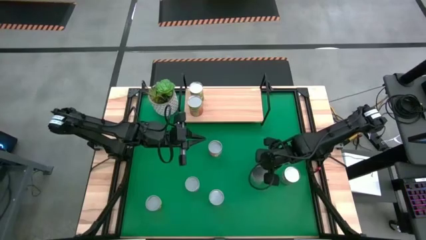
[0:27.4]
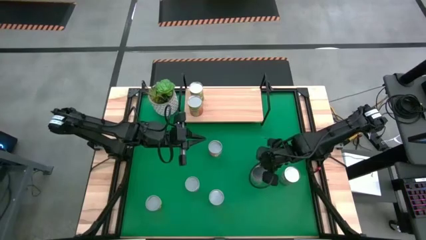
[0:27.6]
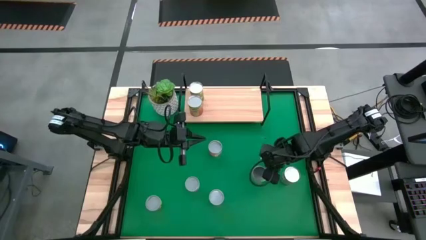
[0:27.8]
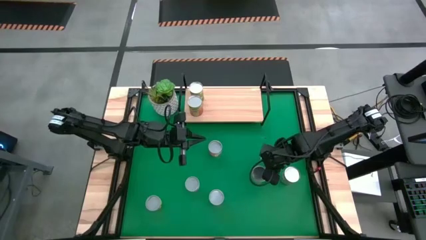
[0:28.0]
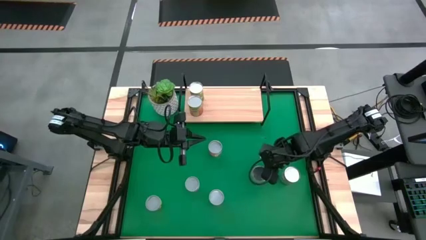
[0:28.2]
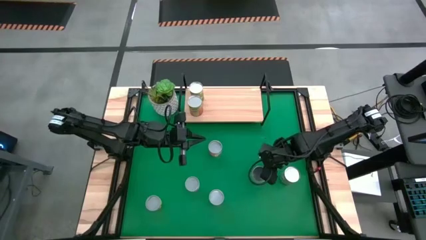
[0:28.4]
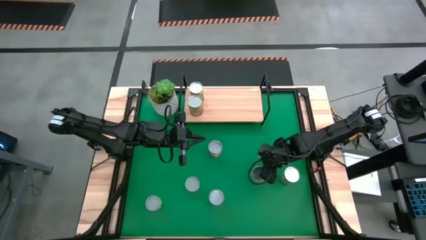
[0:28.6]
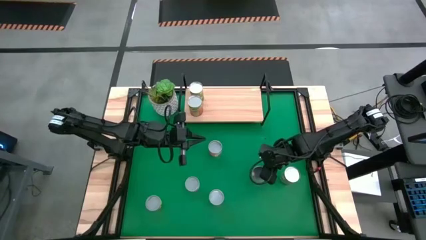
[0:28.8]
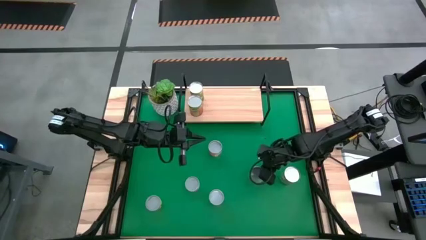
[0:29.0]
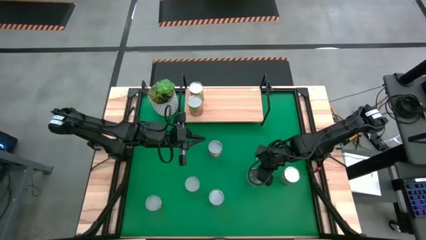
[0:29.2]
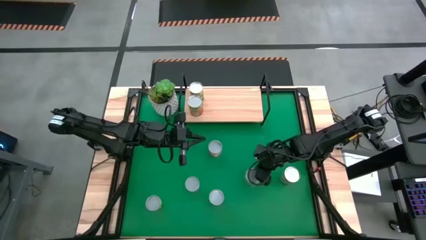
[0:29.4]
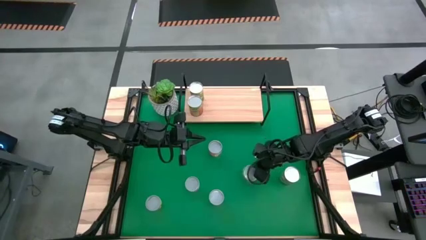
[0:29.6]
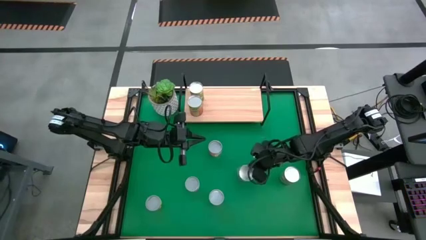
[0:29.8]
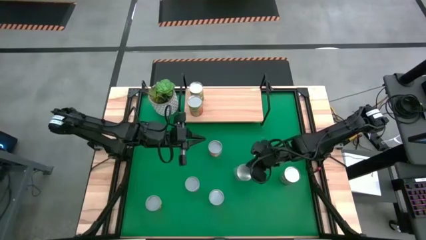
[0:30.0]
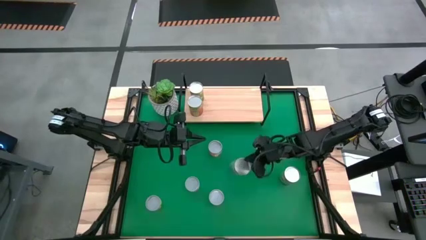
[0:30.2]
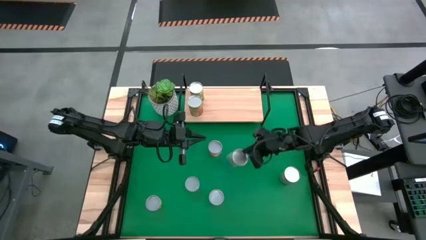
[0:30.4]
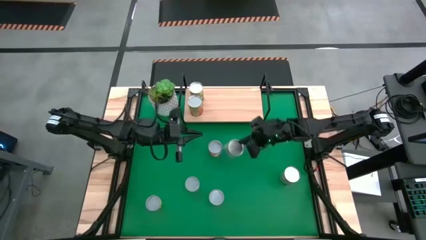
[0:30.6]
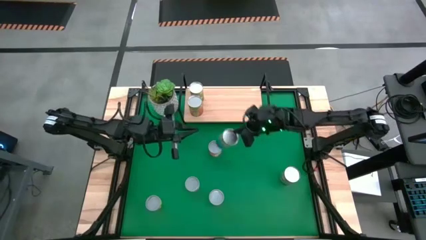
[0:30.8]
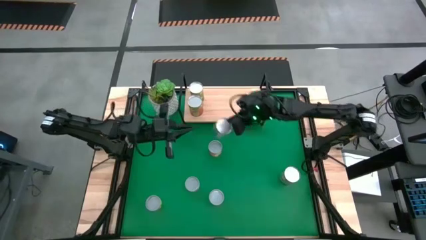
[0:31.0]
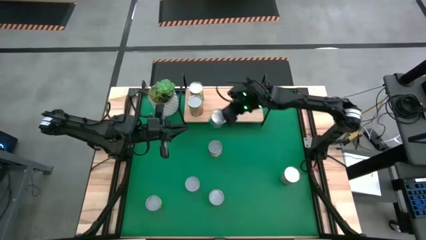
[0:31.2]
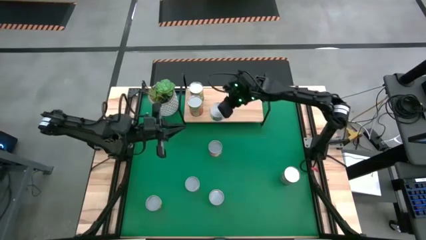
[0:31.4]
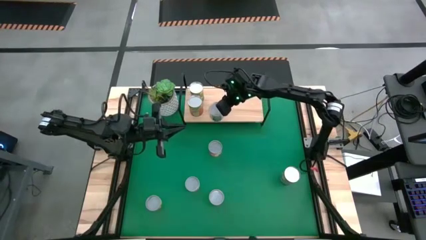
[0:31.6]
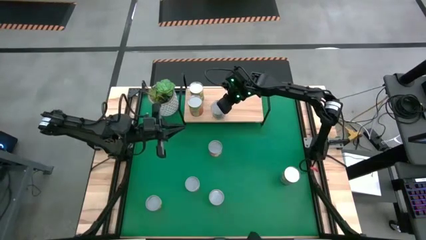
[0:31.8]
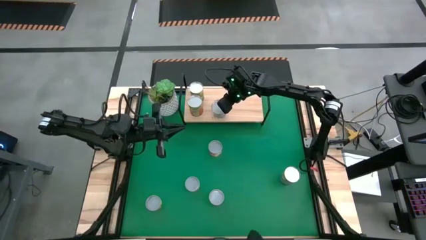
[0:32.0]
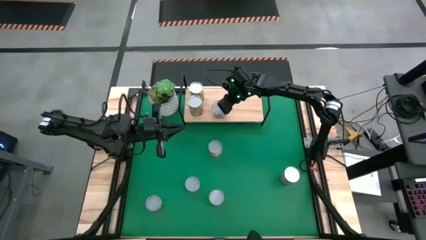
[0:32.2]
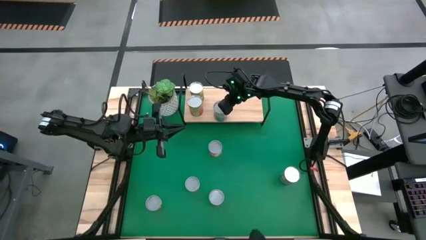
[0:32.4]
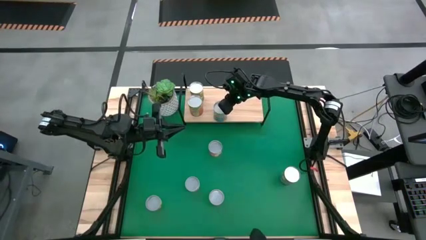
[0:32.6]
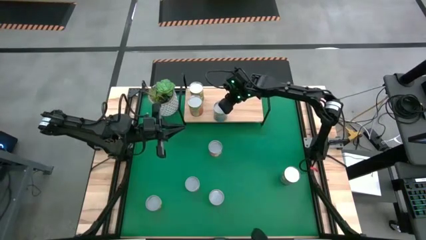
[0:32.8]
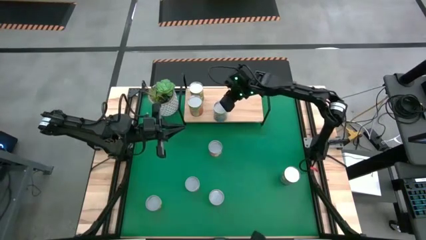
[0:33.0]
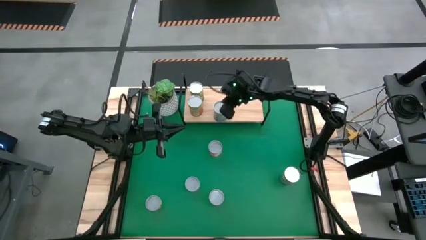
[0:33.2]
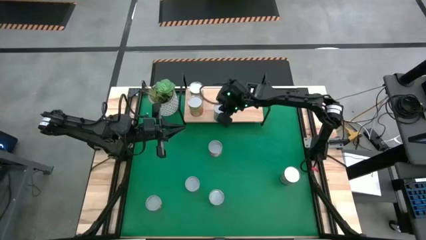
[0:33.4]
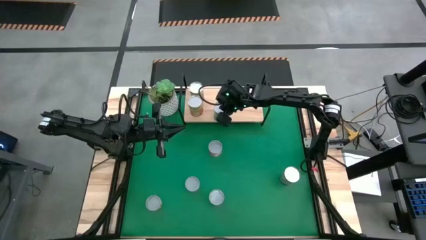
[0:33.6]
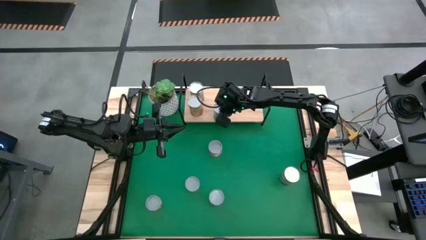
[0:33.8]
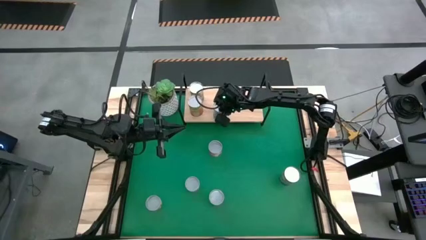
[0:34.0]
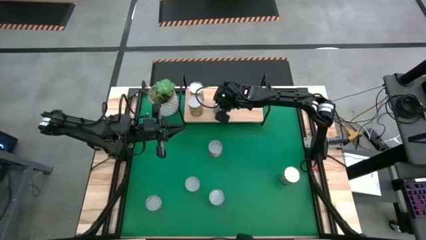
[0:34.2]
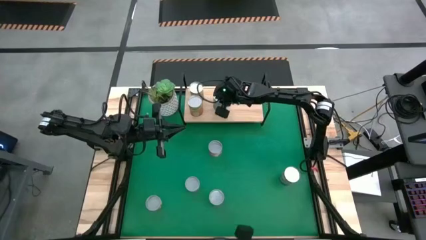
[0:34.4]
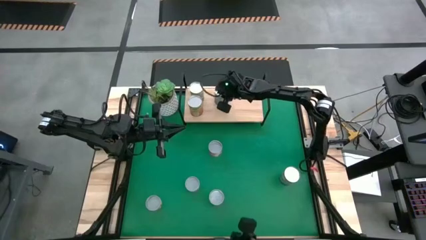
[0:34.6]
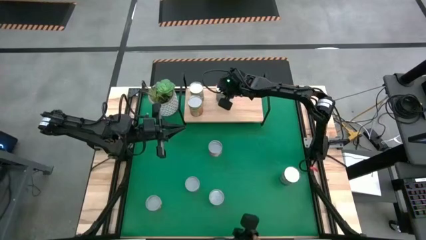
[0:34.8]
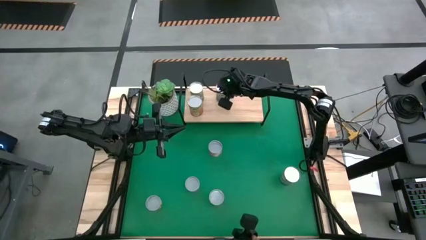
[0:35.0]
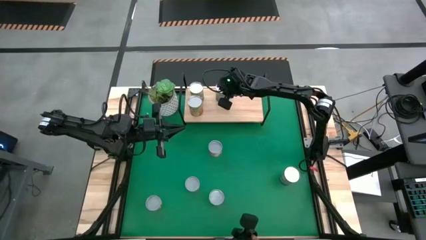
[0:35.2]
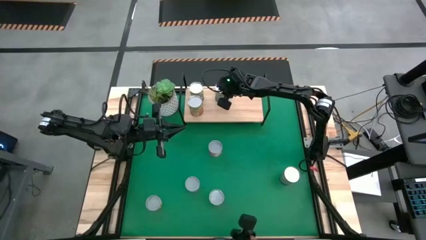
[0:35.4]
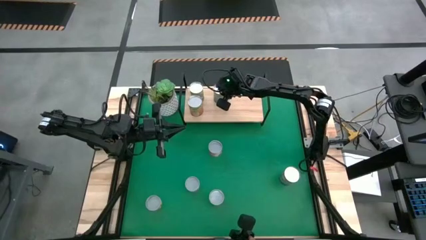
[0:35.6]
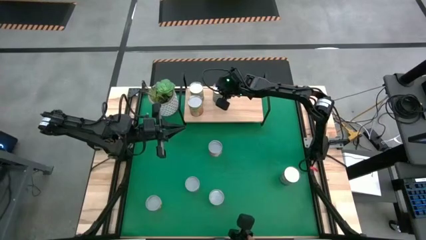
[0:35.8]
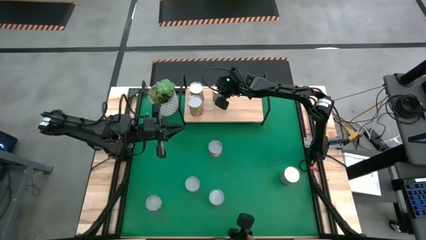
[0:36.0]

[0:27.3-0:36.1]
Task: Pick and place cans onto a shelf
Put the canned cherries on the shelf

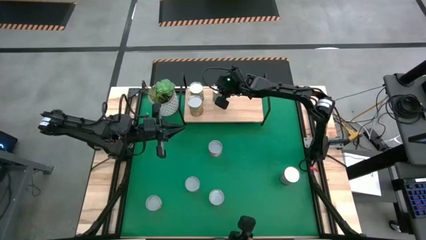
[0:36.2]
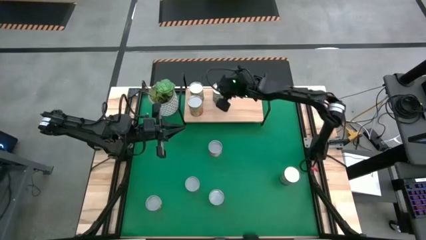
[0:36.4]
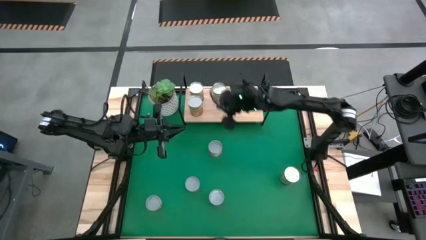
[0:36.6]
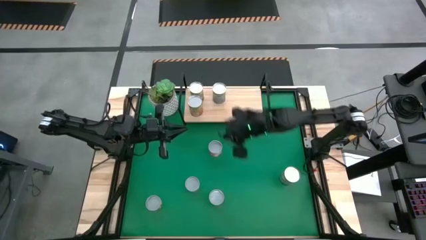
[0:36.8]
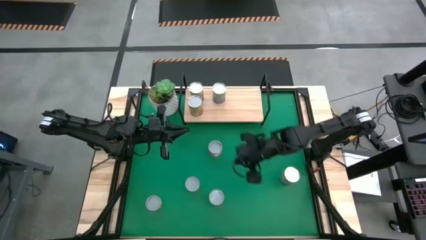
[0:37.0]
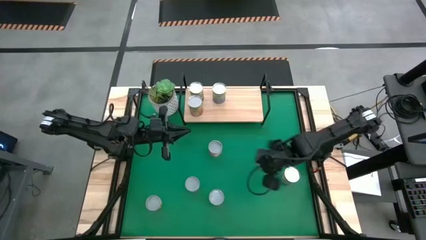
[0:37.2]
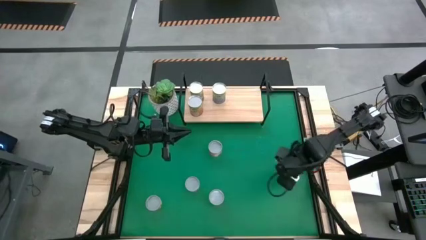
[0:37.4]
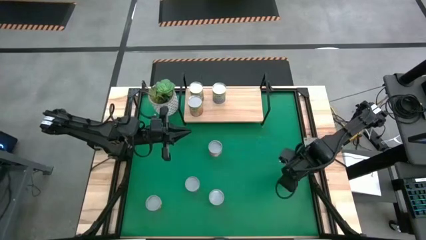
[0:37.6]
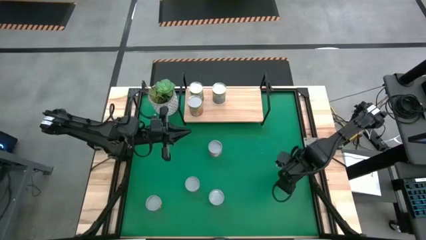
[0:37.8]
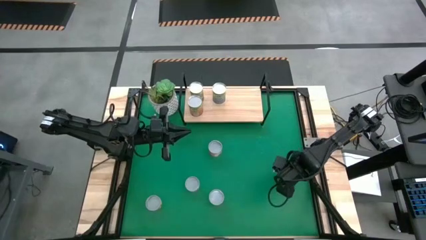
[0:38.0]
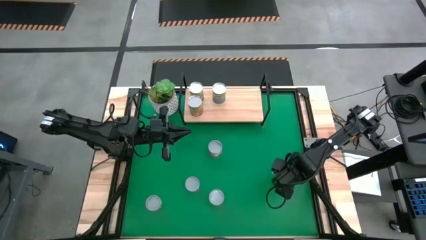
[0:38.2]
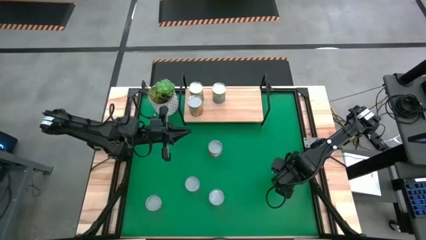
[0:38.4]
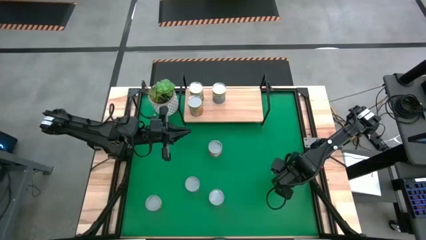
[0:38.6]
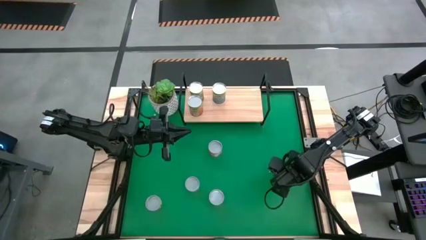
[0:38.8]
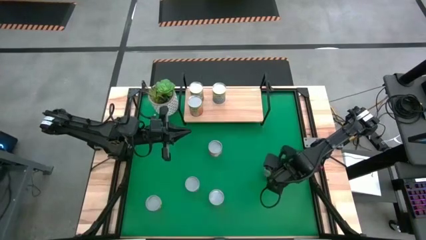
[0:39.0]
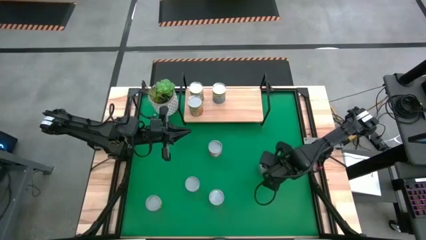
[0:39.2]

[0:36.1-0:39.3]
Put the canned peas on the shelf

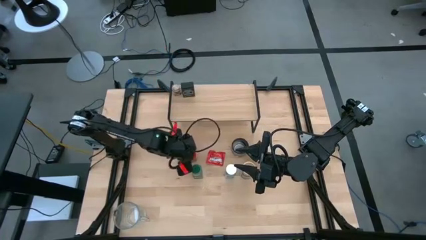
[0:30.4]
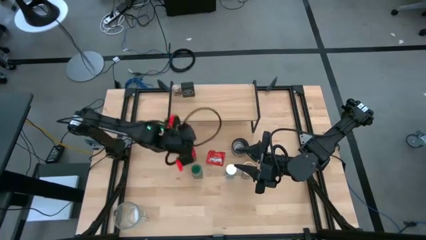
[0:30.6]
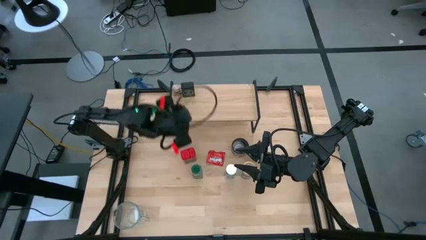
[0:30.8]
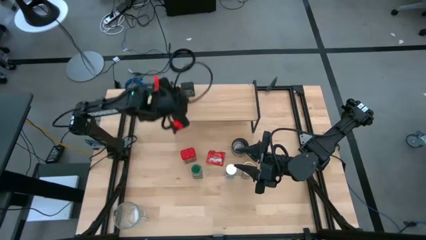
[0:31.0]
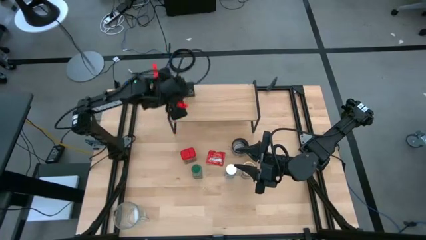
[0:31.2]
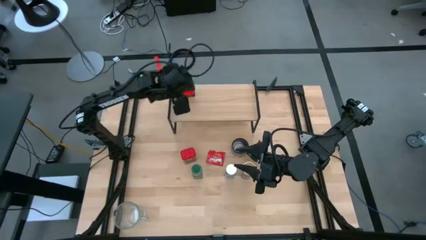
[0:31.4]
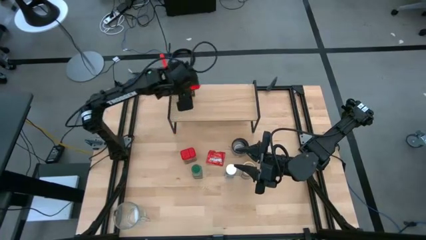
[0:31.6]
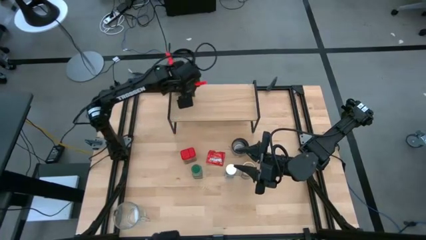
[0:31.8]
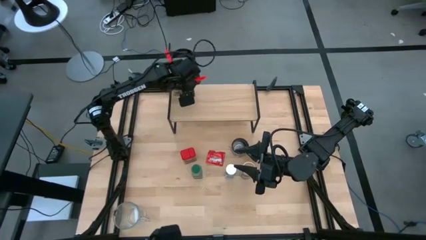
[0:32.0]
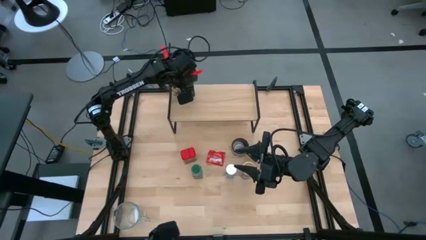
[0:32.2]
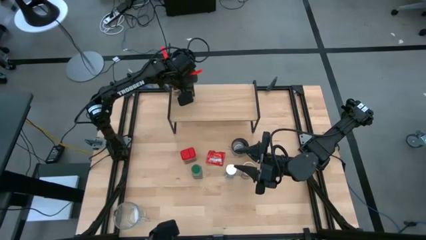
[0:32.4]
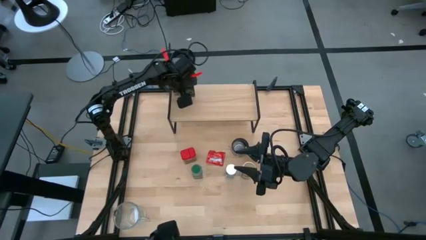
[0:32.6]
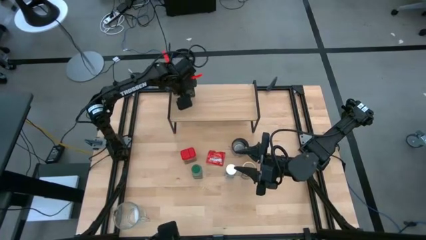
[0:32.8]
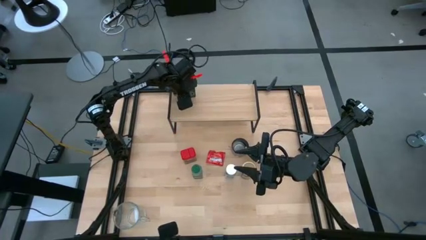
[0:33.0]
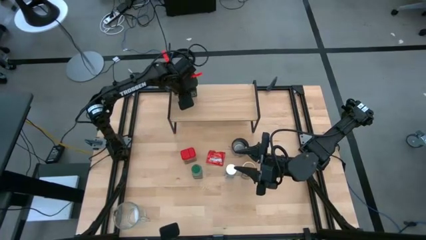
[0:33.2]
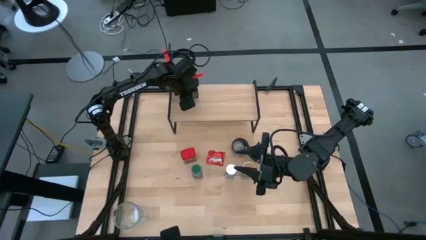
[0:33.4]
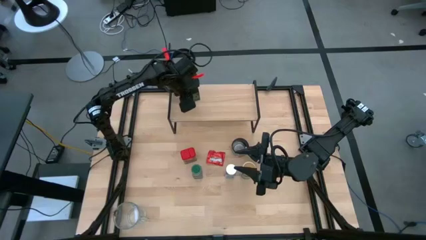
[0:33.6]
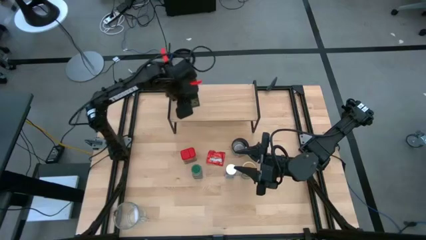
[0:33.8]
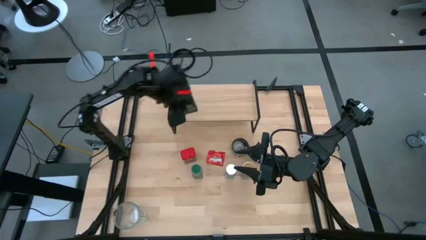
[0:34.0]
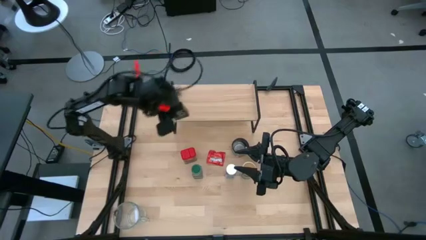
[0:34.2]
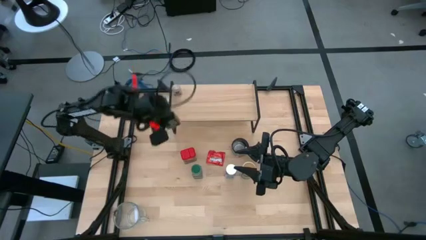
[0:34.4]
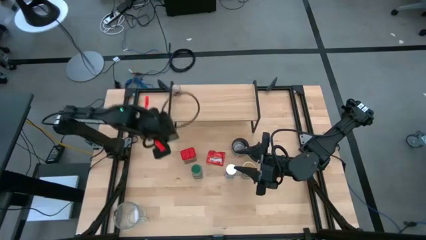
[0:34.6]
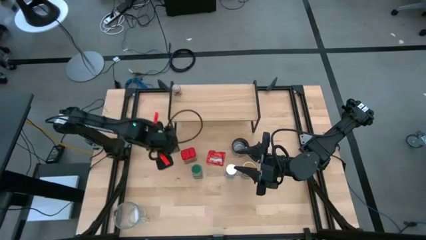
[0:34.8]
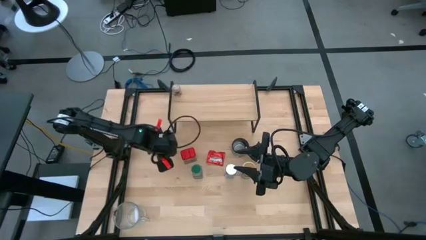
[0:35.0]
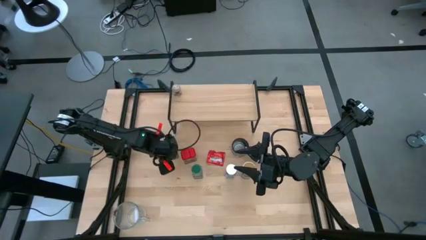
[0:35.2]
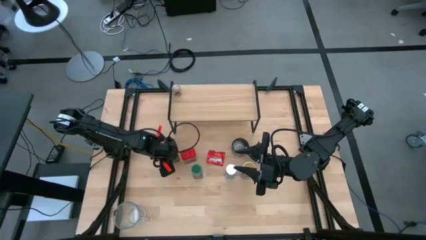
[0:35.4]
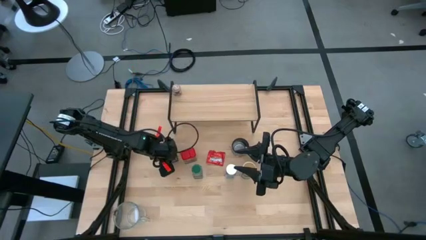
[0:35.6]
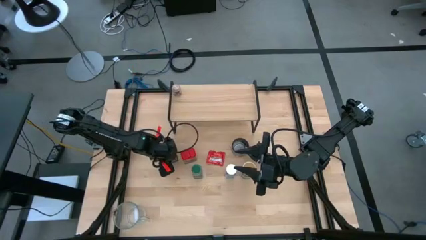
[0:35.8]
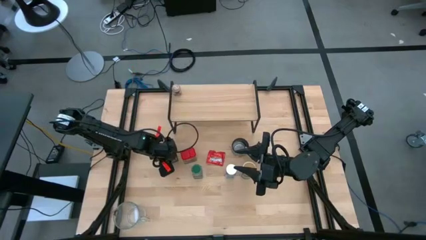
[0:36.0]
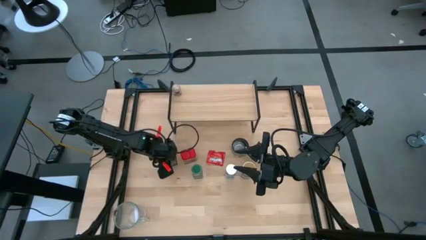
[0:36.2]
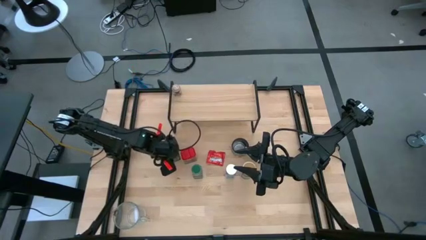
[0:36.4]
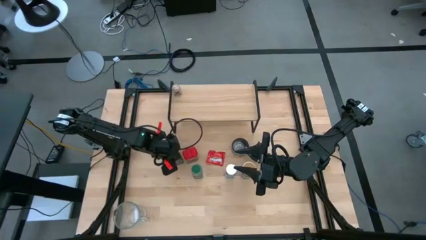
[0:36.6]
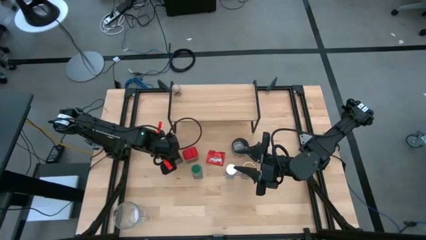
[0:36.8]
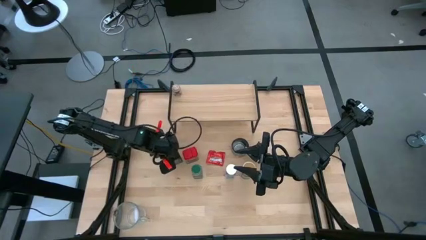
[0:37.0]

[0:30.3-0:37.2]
Task: Shelf spices
Remove the black seasoning can from the shelf
